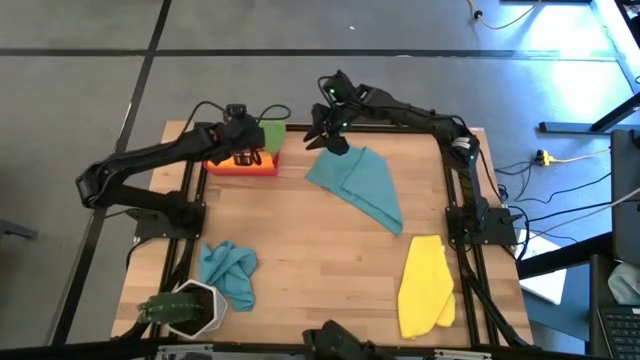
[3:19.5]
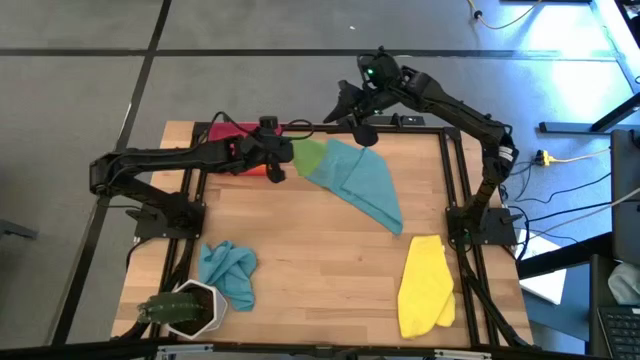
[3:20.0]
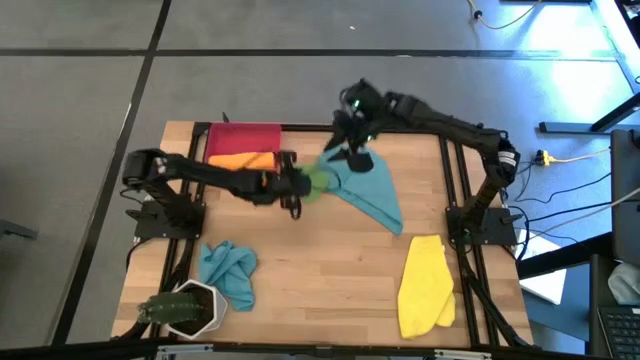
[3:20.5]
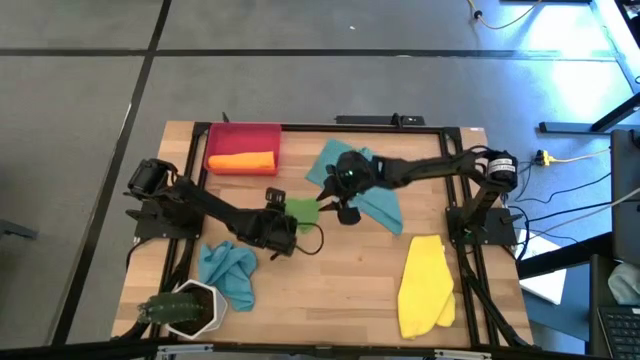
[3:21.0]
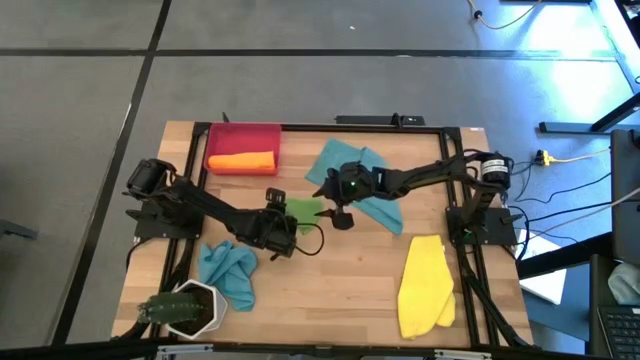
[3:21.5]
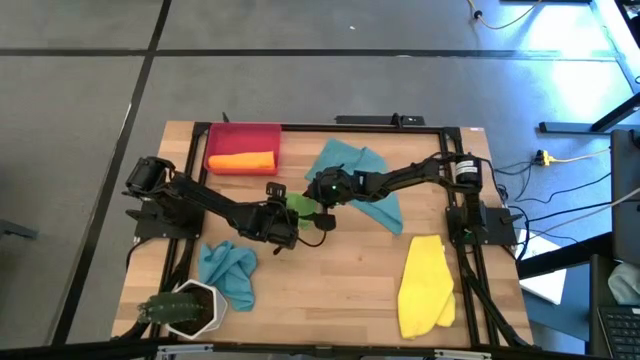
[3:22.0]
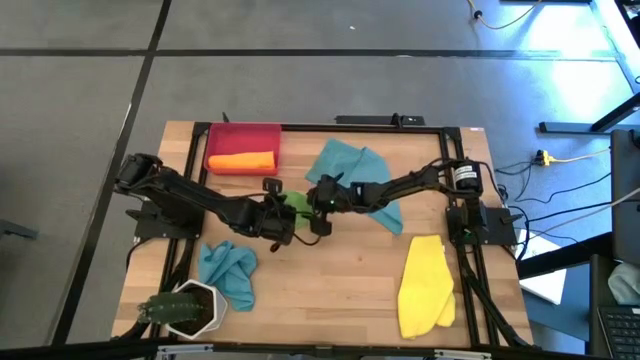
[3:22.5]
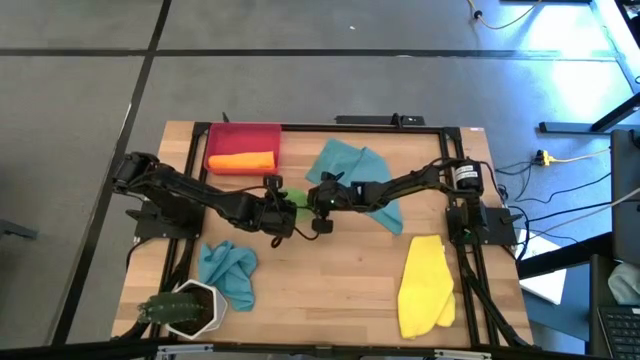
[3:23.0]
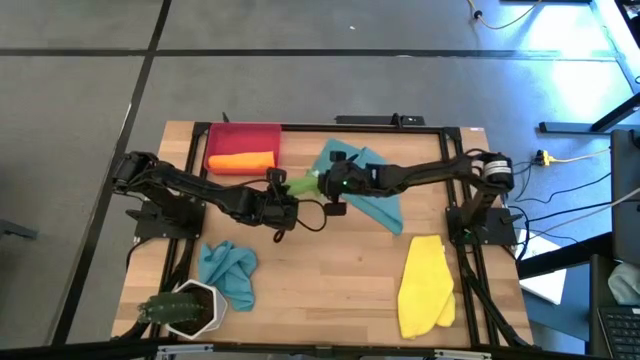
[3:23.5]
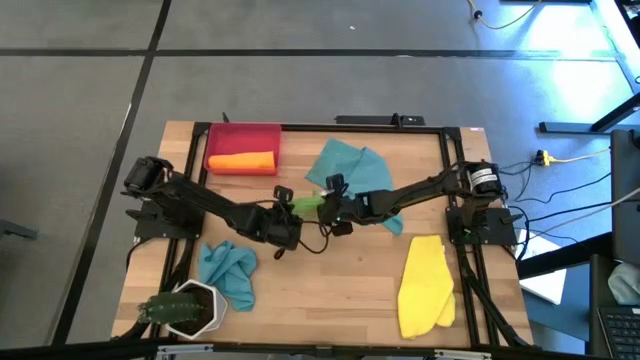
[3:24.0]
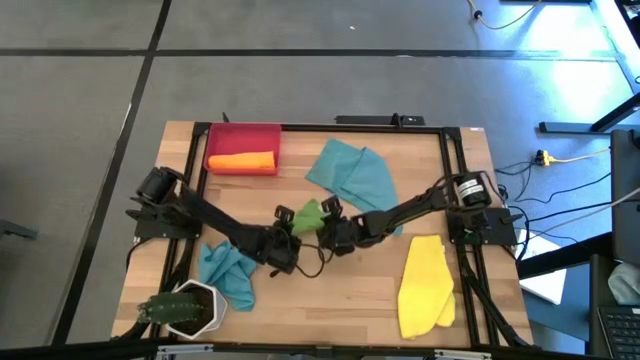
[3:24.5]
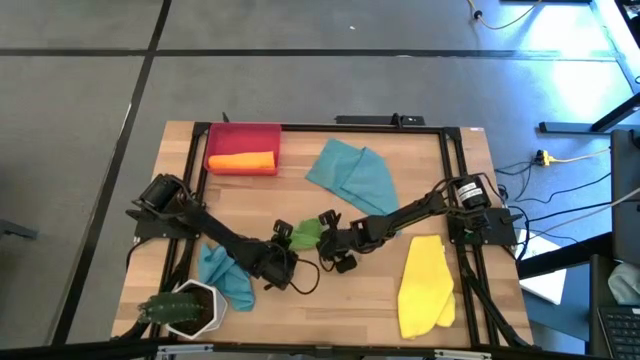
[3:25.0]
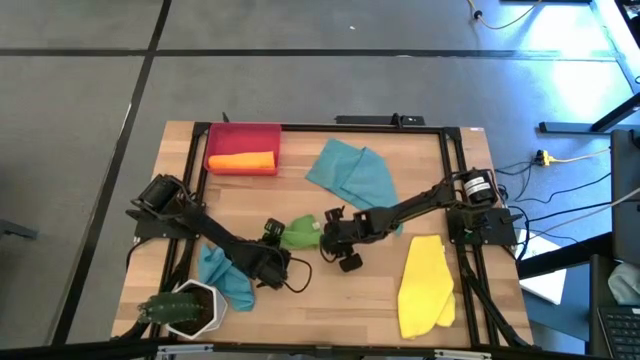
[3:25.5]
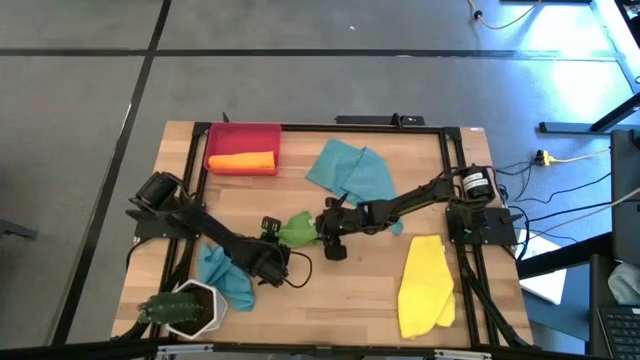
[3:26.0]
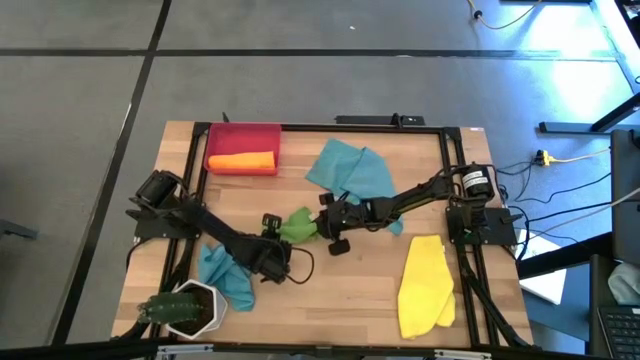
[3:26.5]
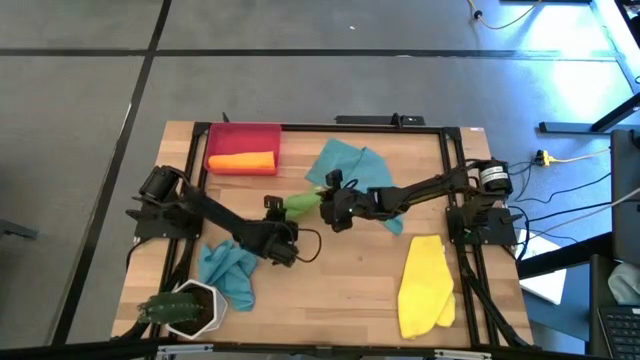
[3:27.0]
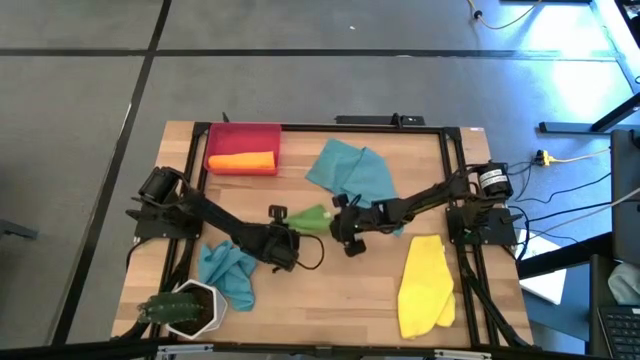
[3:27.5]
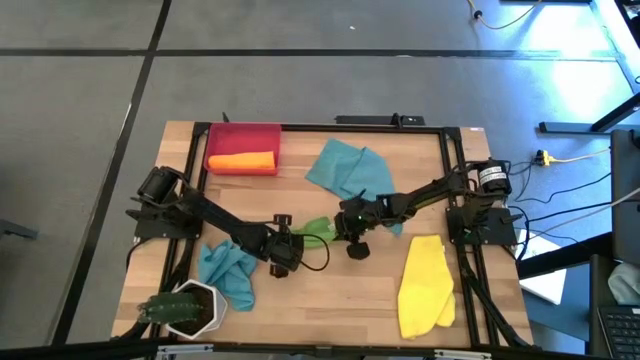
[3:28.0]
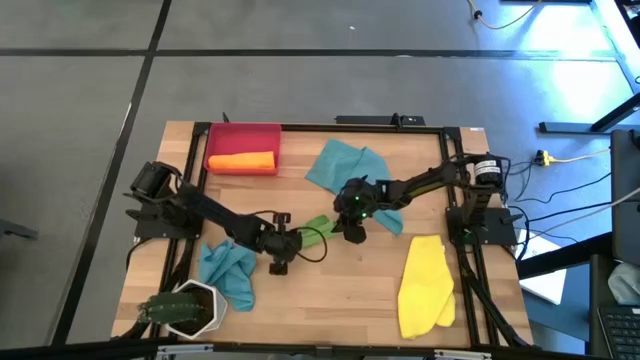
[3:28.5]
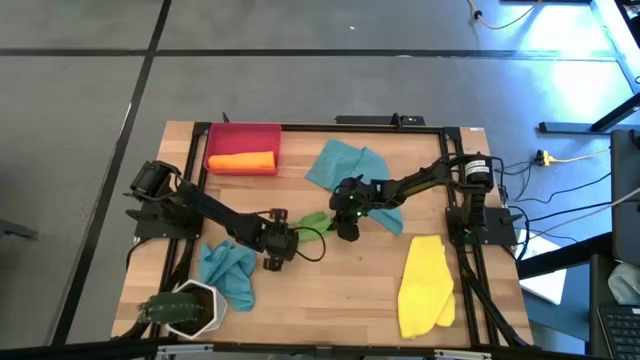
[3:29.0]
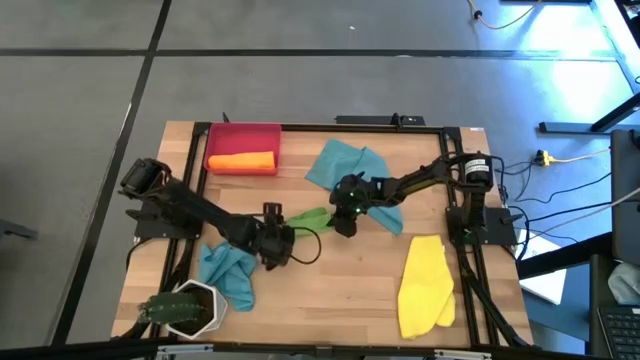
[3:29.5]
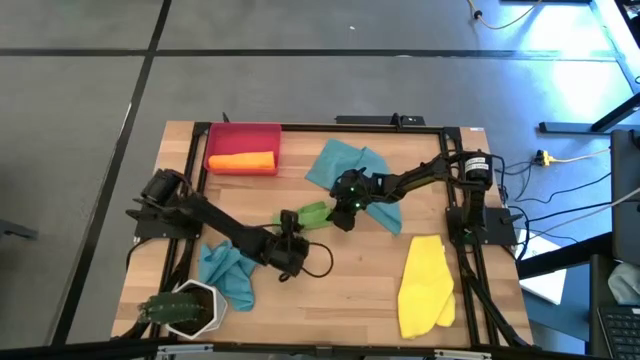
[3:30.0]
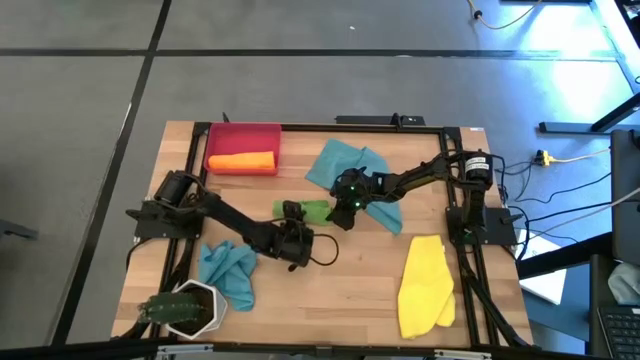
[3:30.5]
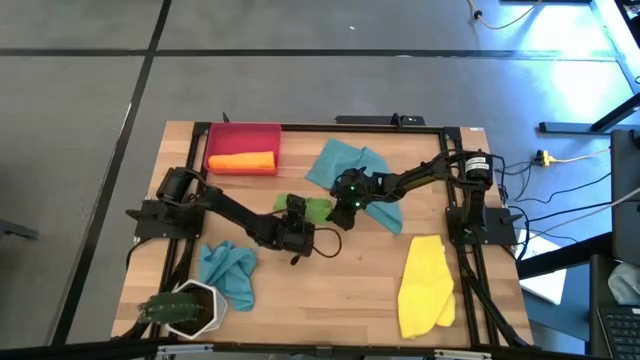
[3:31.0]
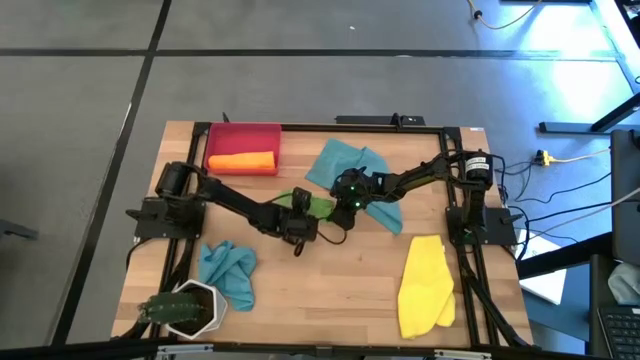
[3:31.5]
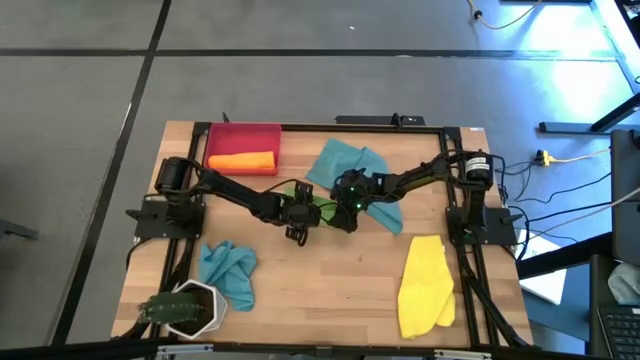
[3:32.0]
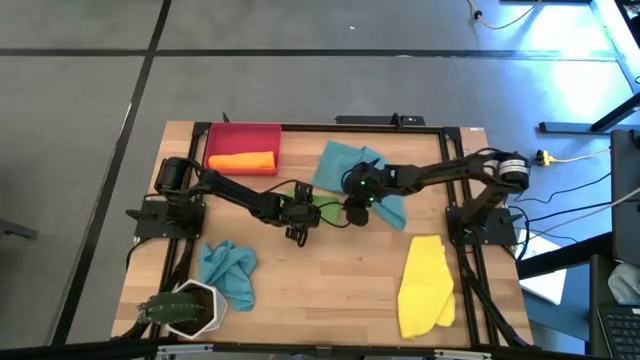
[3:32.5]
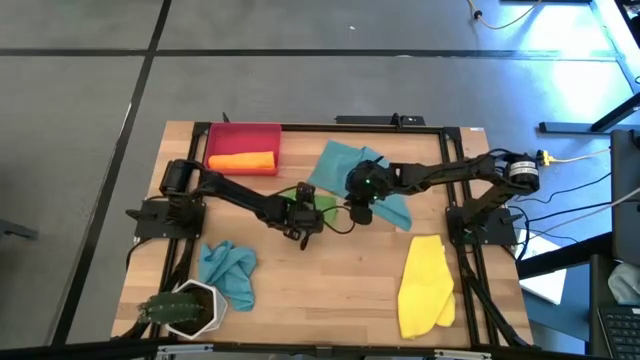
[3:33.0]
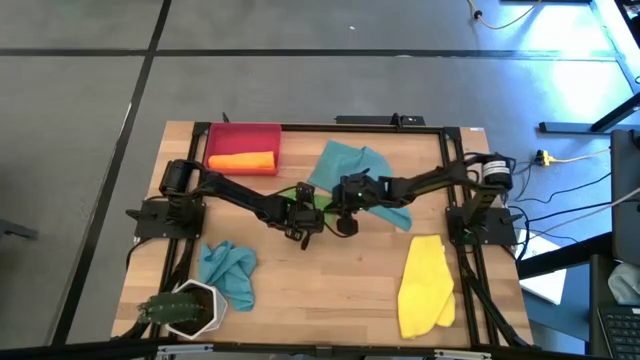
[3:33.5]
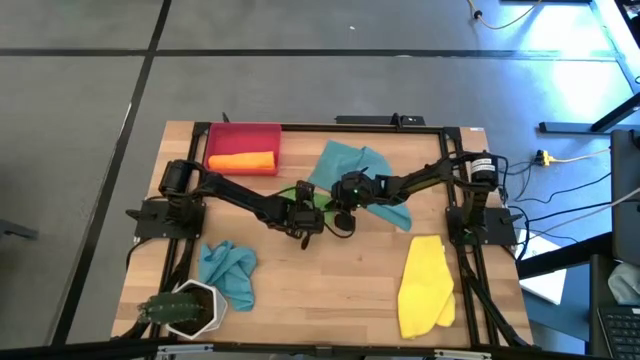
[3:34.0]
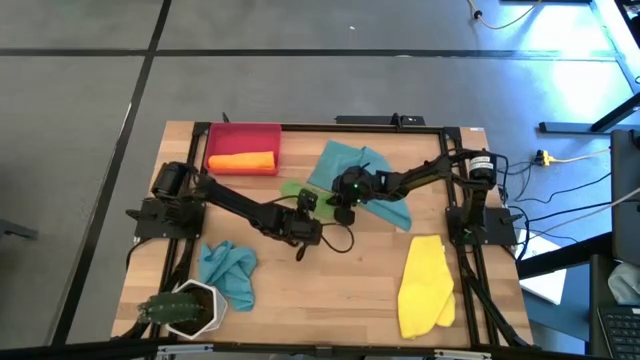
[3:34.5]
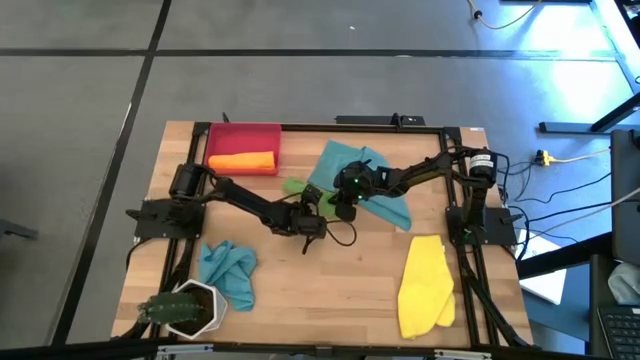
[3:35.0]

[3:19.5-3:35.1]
Task: Roll microfiber towels into tight, uniform cylinder then place into a basket
Roll the green microfiber towel

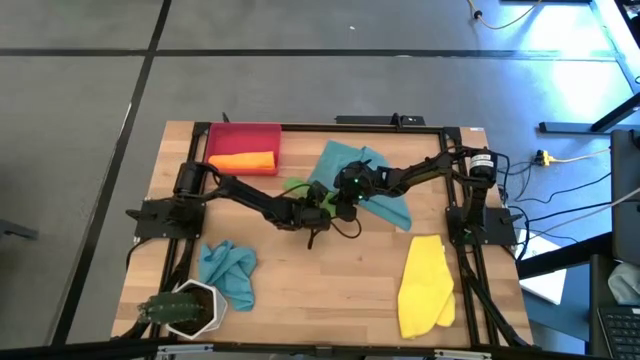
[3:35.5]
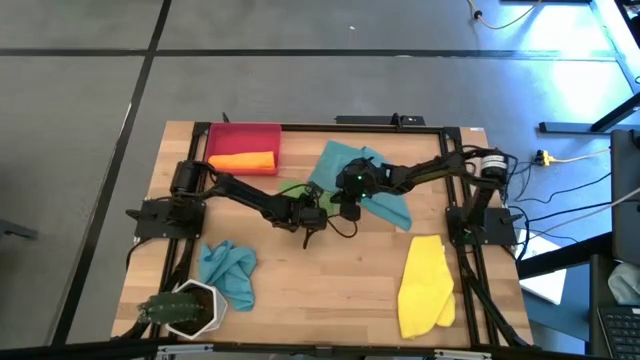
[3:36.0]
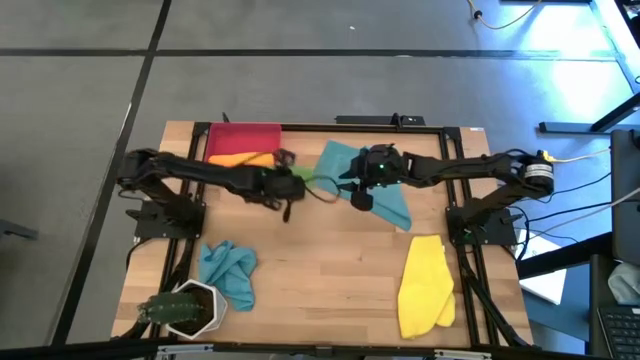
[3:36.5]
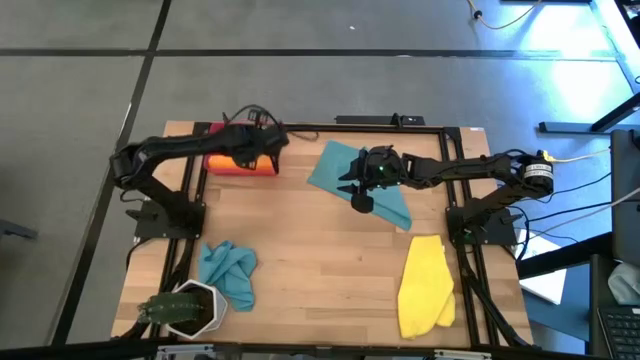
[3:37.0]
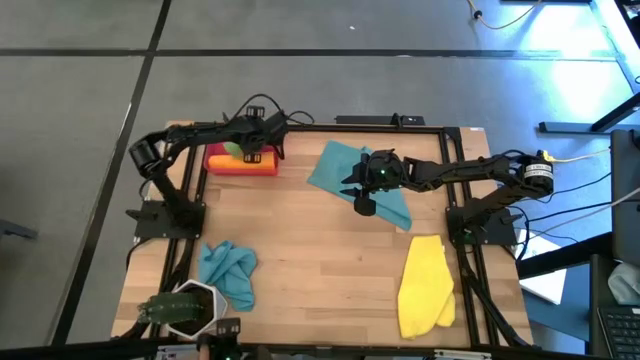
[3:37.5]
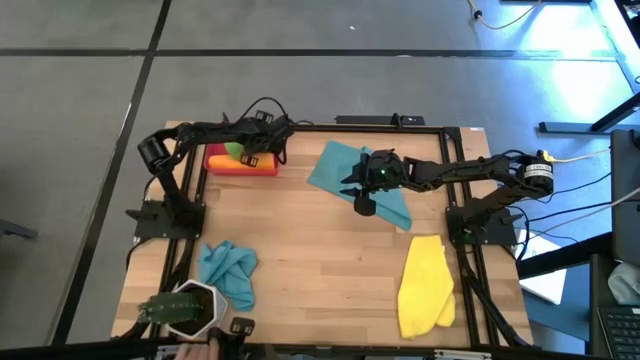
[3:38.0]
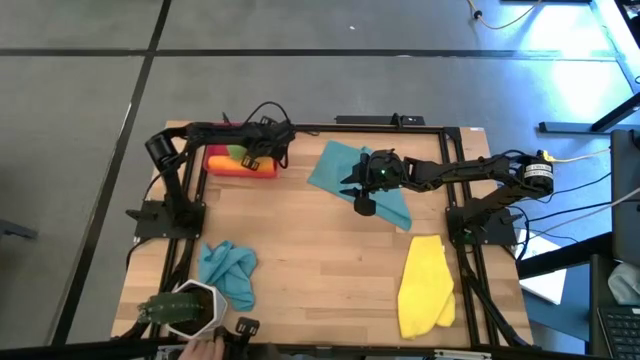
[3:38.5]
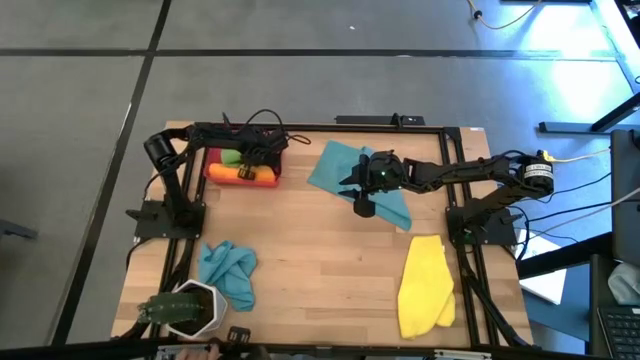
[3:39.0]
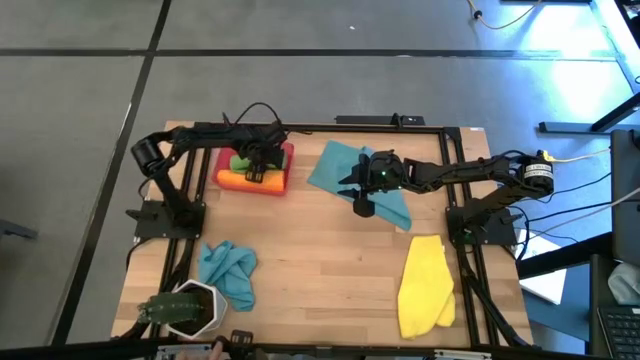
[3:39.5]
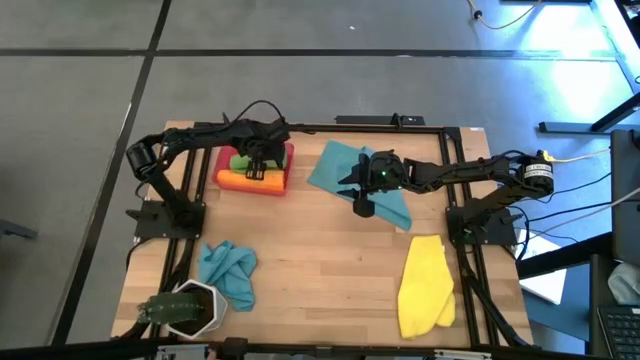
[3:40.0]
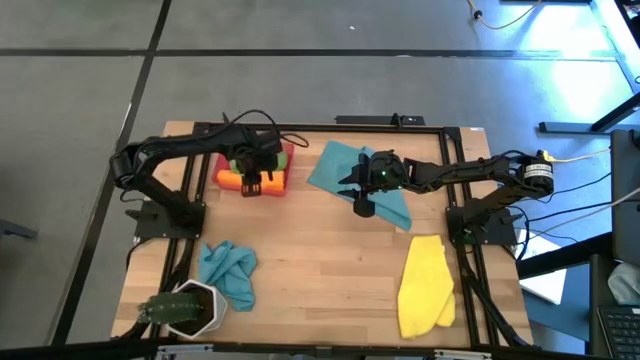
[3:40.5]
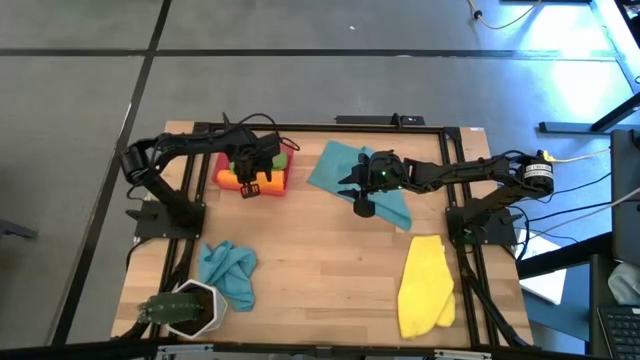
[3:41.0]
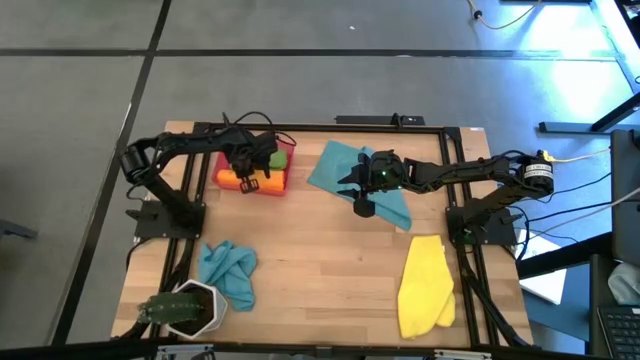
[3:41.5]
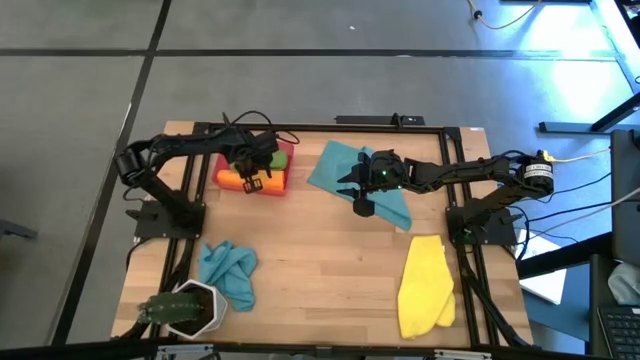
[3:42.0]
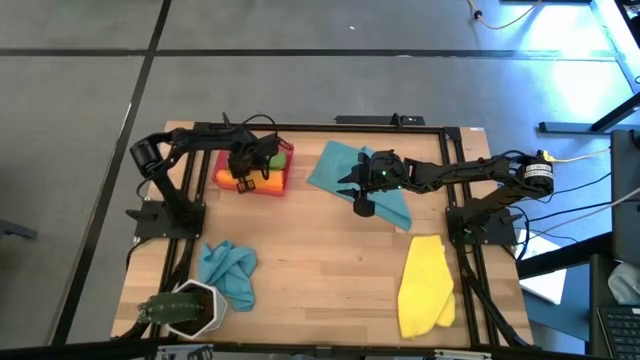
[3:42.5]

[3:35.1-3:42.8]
Put the rolled green microfiber towel into the red bin
